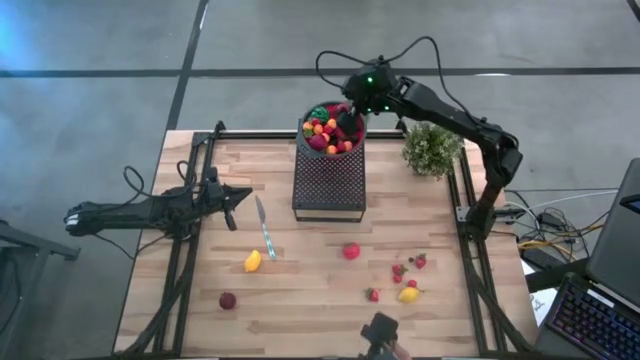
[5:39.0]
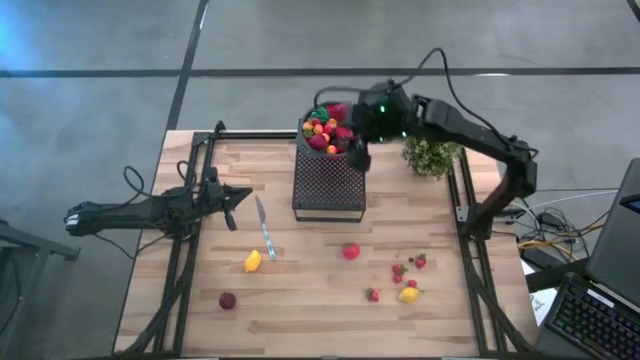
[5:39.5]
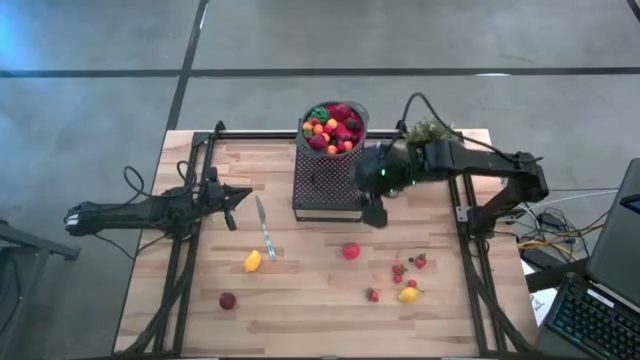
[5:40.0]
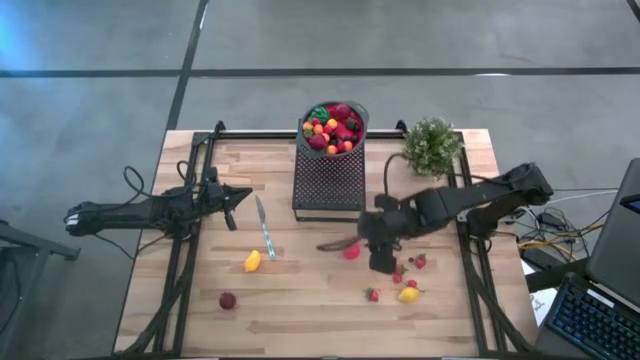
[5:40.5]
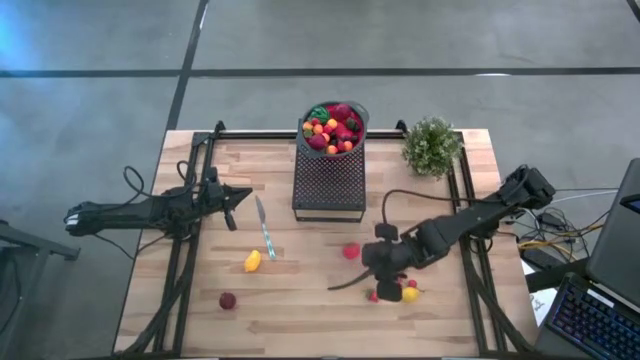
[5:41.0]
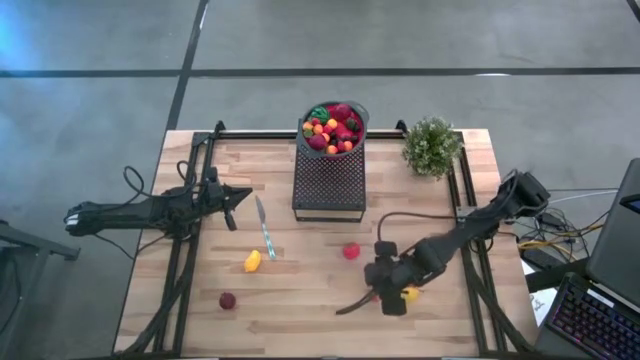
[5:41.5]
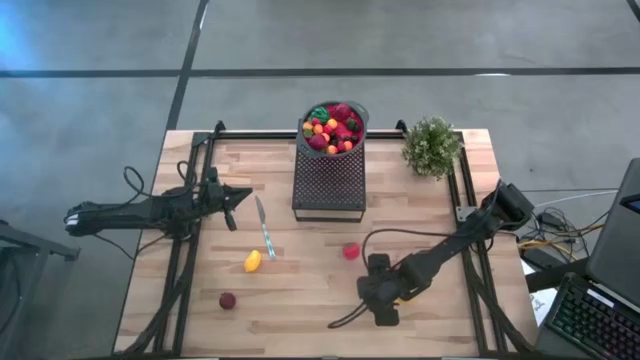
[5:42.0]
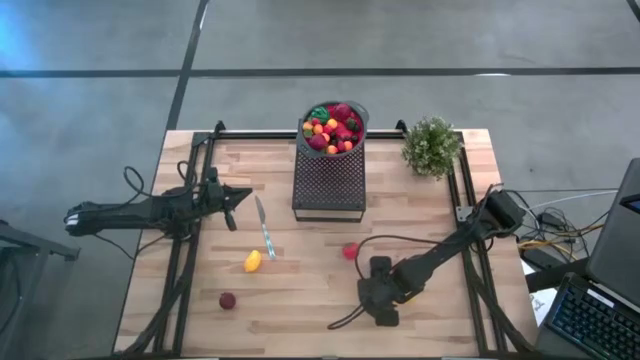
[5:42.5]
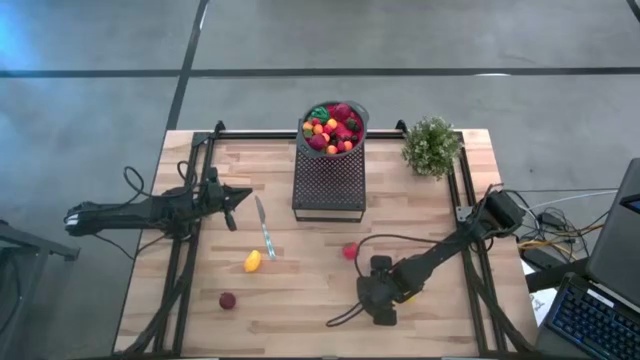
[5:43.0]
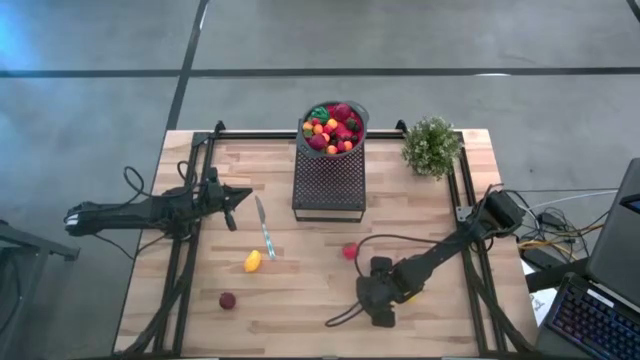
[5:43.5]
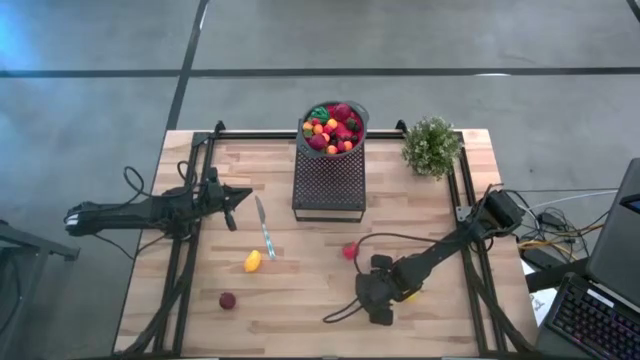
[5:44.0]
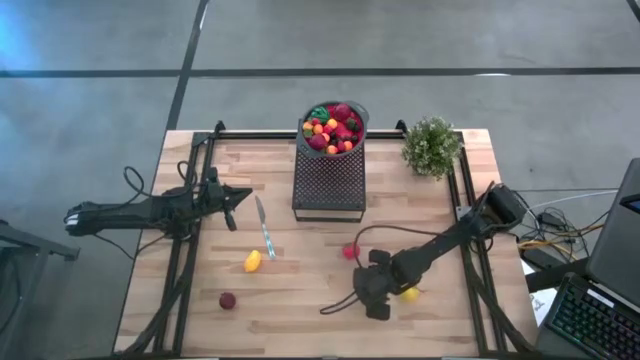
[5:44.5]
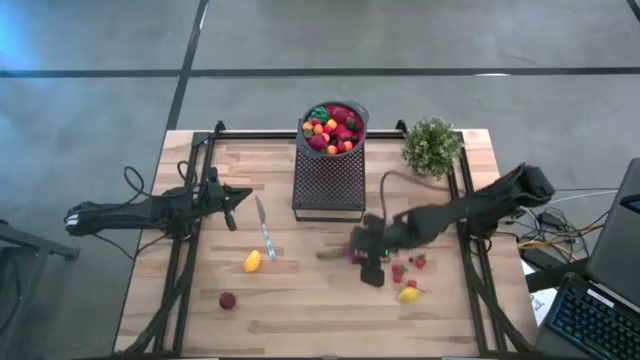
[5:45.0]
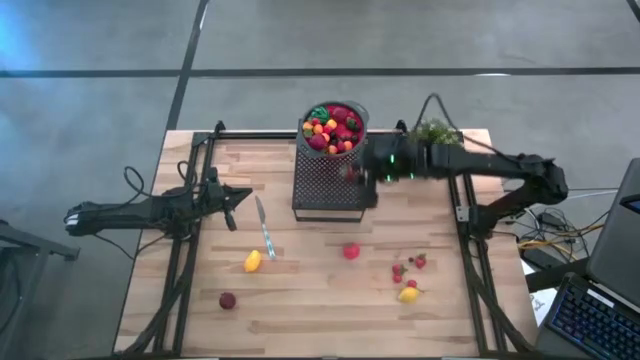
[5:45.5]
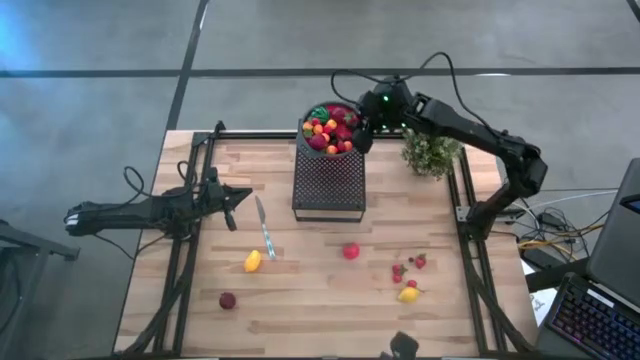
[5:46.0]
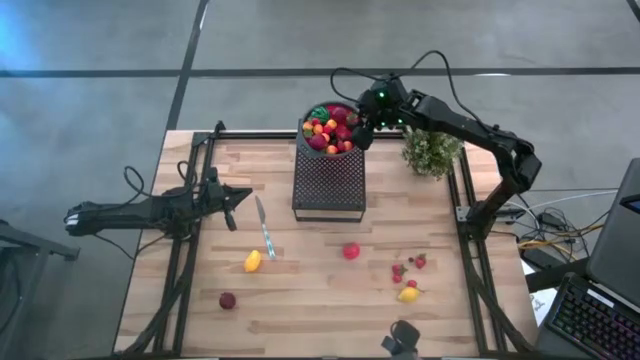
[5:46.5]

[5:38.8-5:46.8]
Task: Pick & Place Fruit
Put the left strawberry into the strainer bowl on the shelf

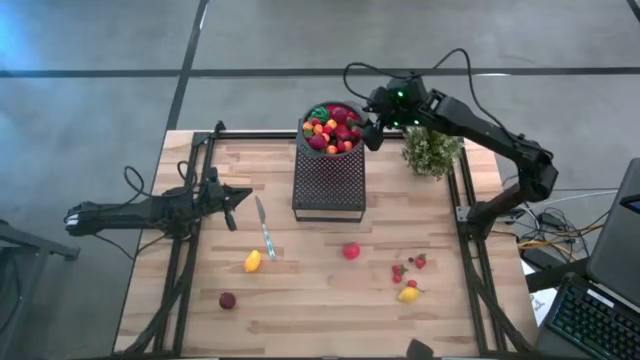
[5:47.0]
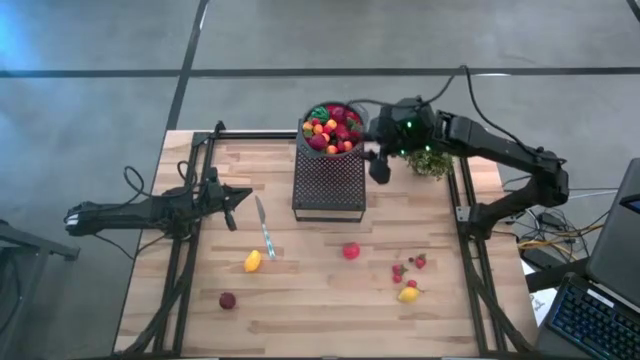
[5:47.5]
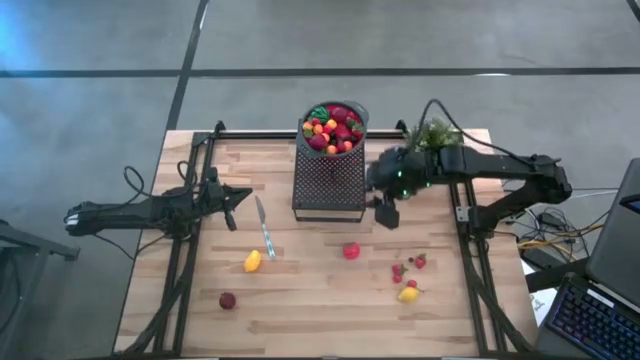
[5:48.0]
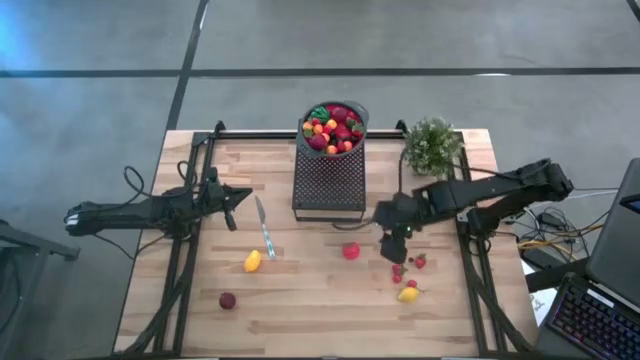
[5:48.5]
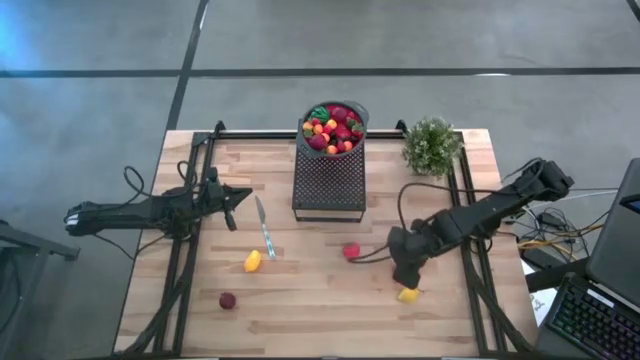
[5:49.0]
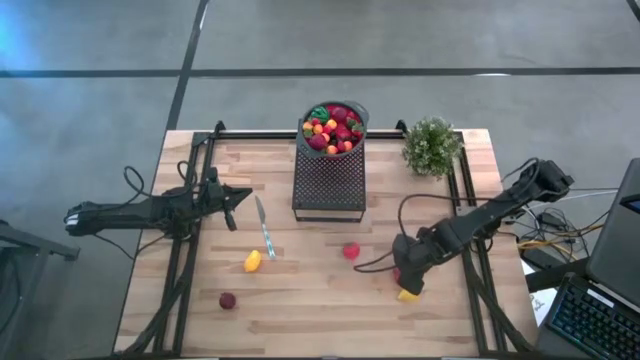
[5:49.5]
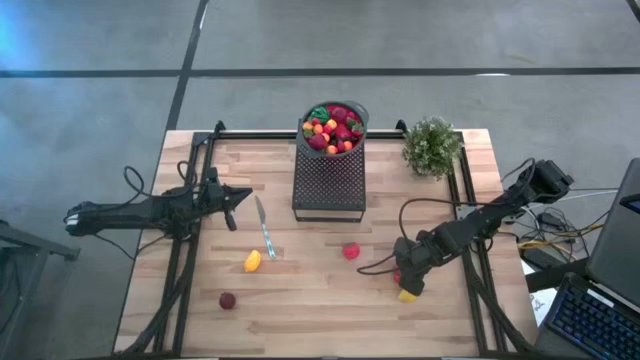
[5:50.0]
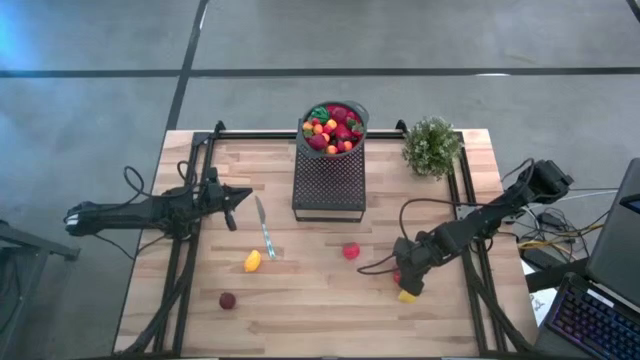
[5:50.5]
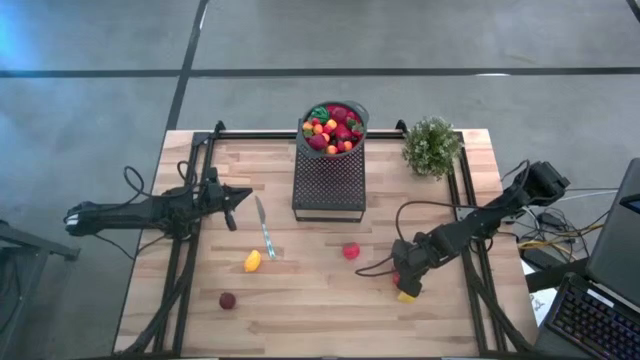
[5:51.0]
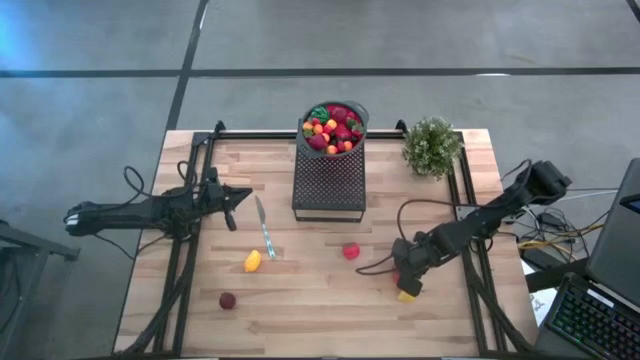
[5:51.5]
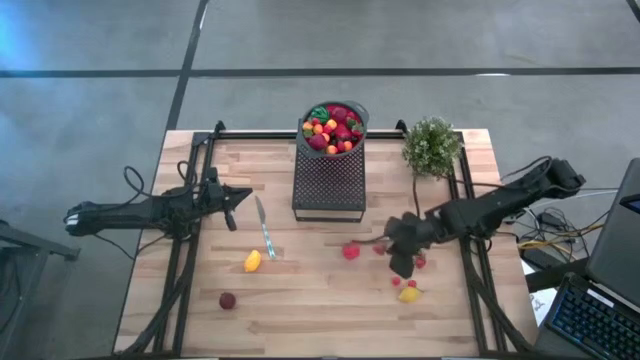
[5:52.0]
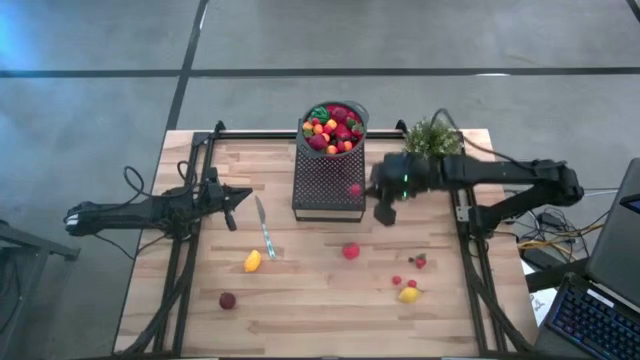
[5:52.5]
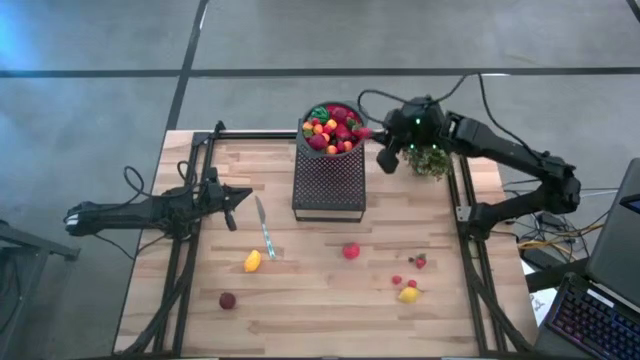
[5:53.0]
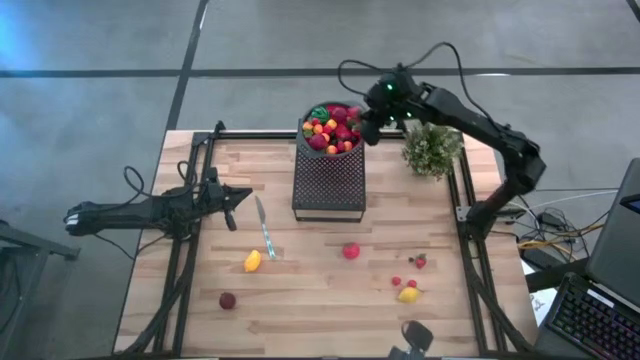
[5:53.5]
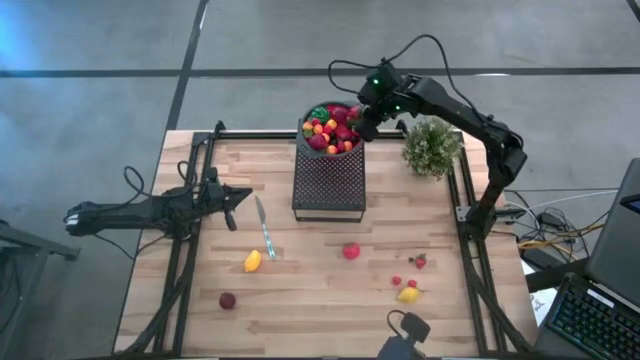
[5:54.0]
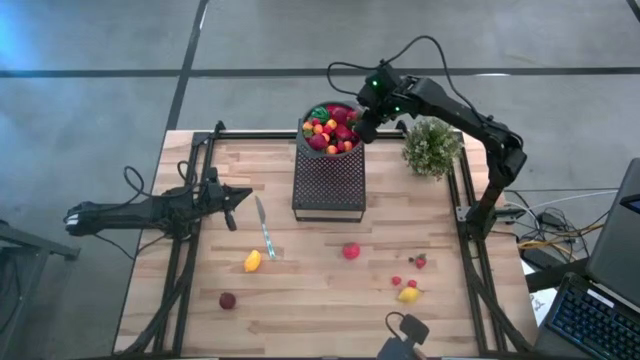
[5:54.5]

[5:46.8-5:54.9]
Put the left strawberry into the strainer bowl on the shelf

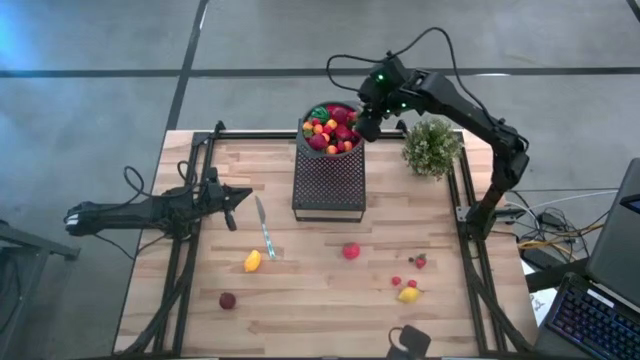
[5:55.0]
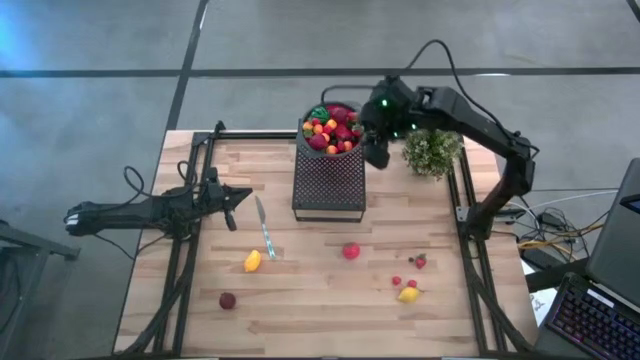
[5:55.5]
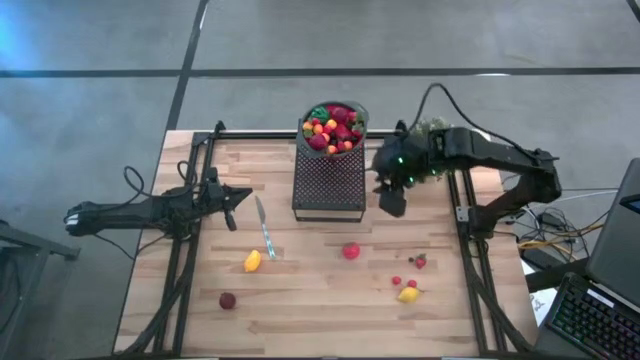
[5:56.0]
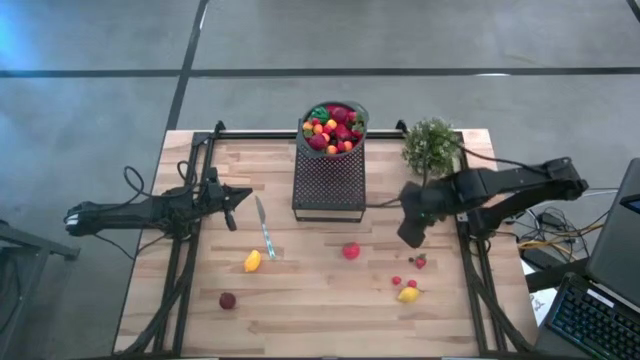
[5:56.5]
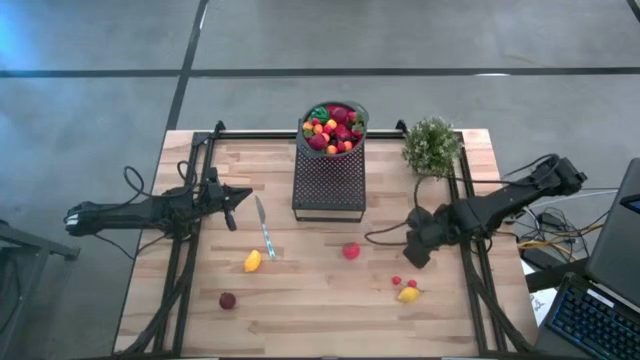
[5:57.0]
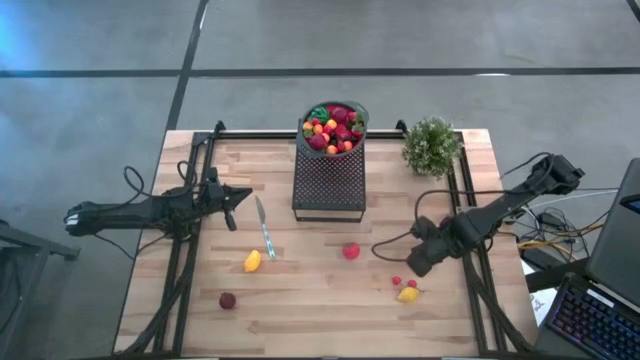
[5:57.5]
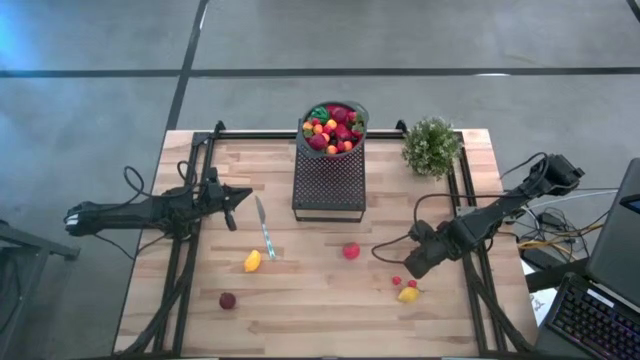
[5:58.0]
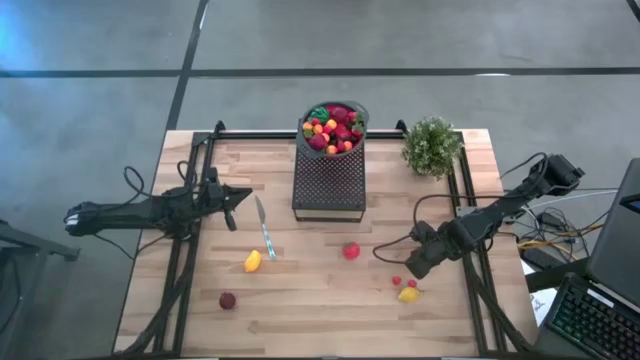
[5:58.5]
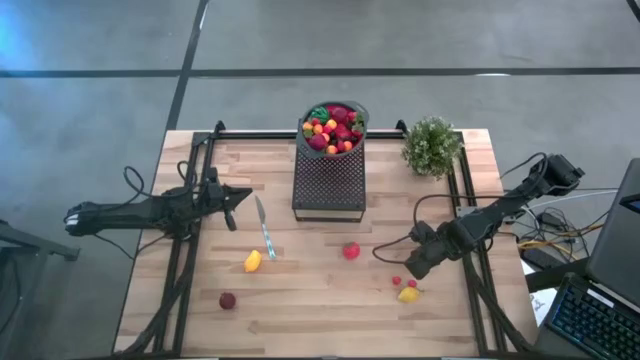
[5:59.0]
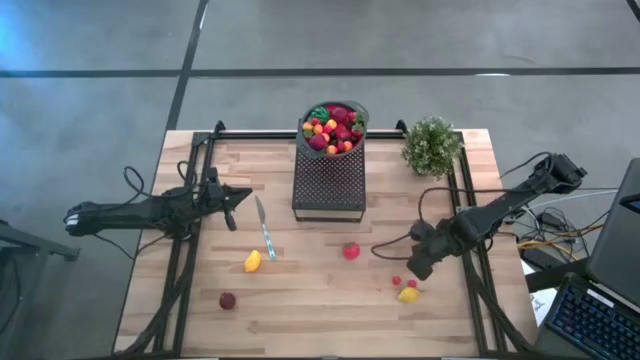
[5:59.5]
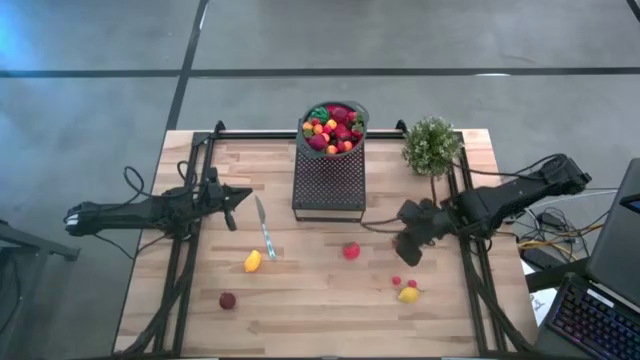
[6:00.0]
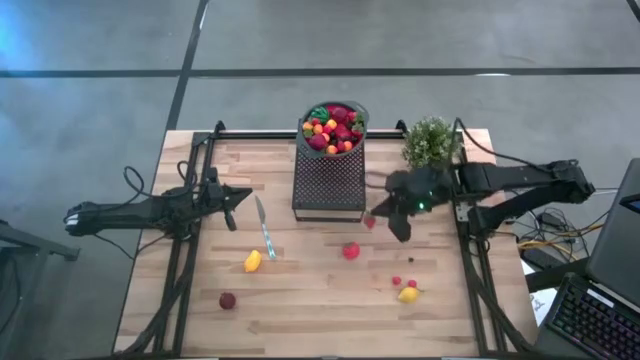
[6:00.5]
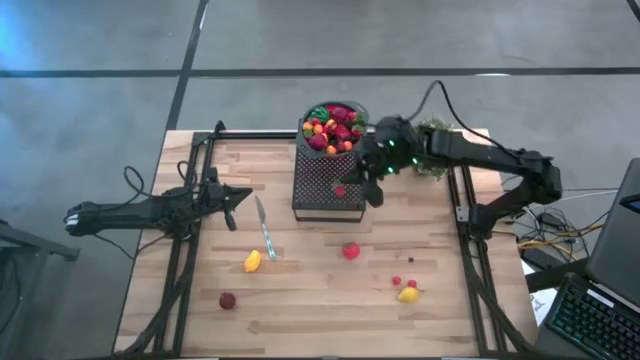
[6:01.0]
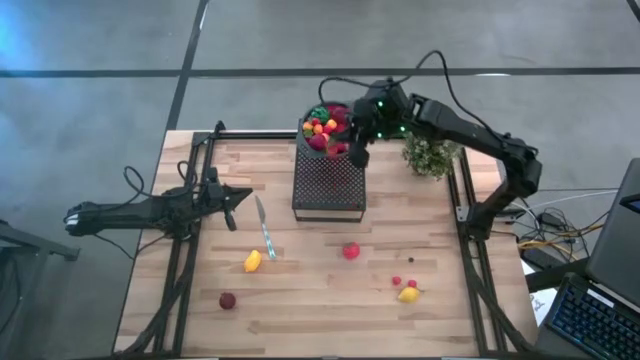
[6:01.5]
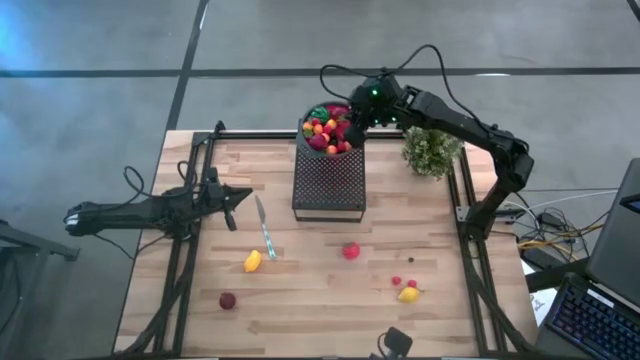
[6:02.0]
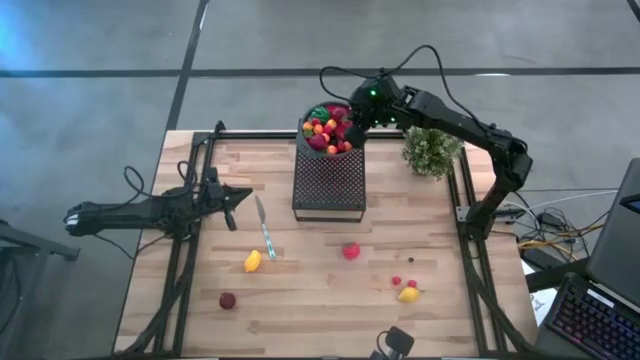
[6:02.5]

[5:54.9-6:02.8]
Put the strawberry into the strainer bowl on the shelf
